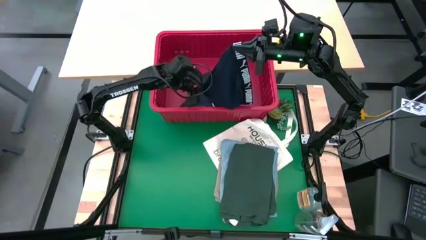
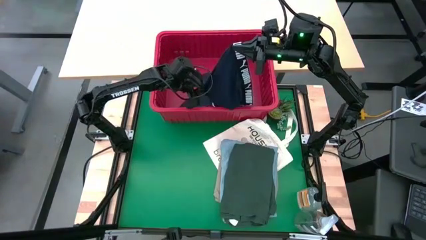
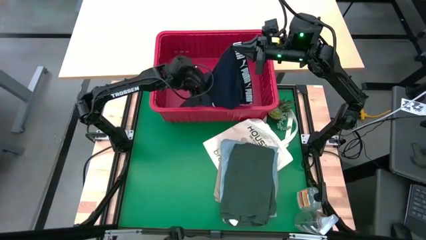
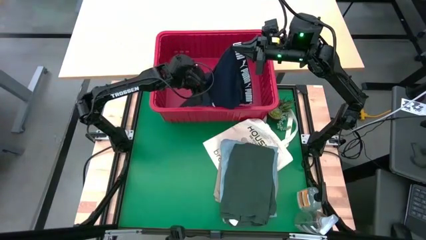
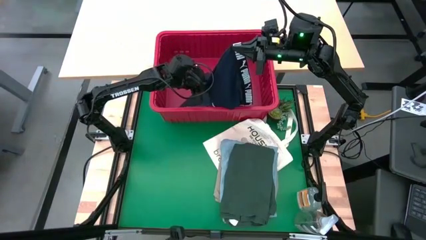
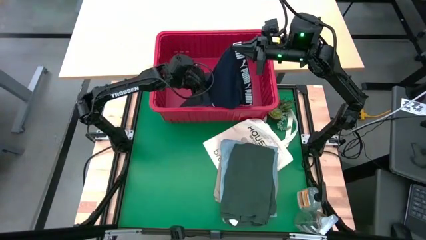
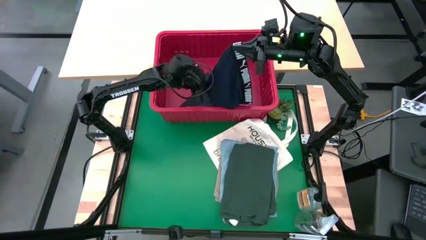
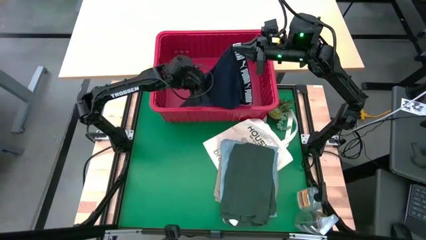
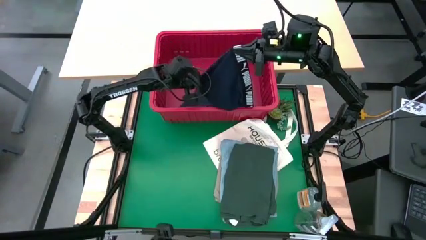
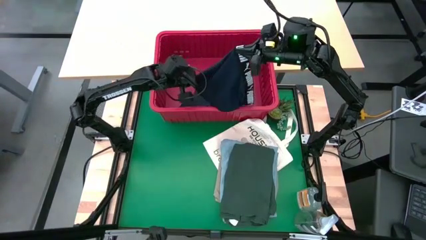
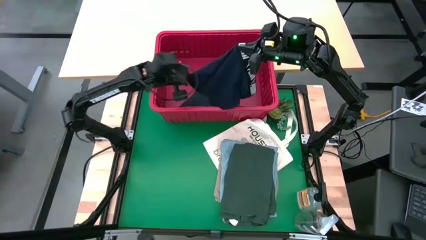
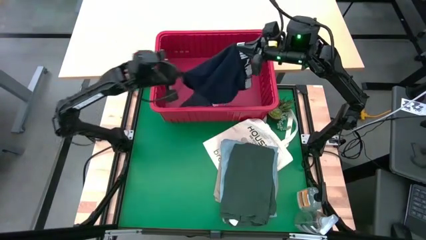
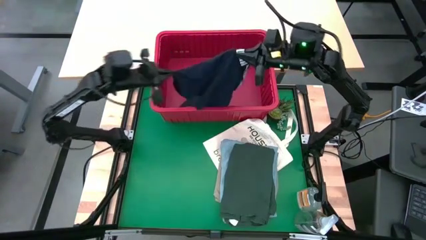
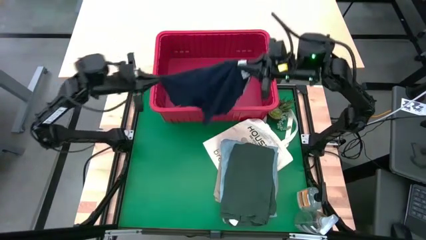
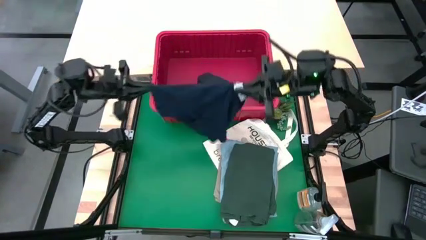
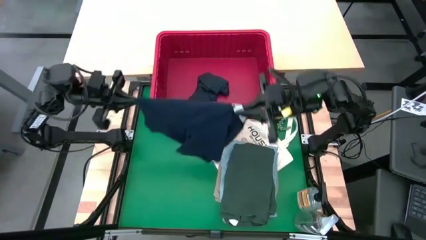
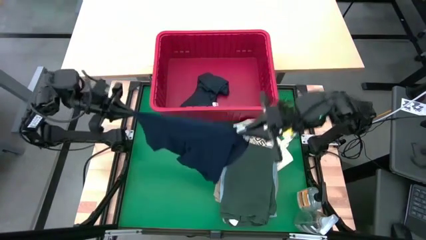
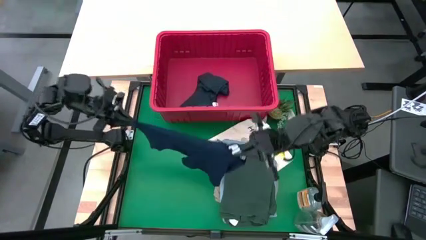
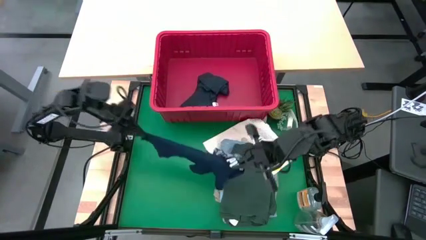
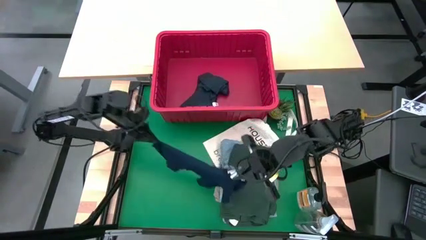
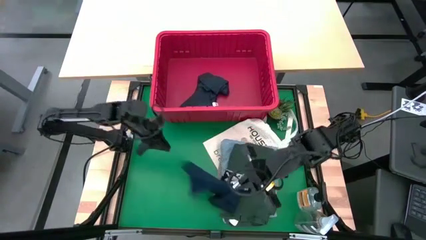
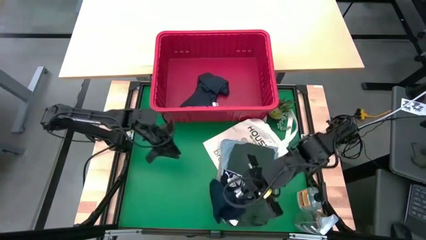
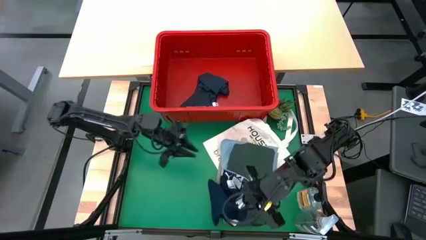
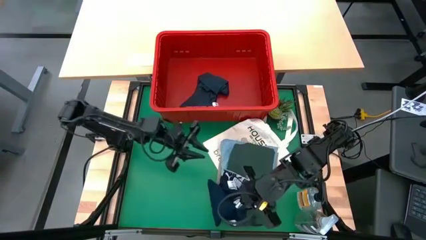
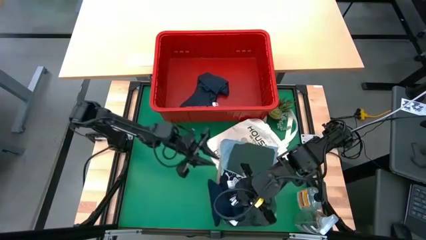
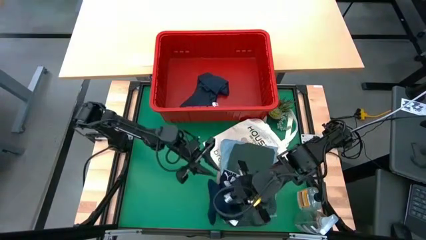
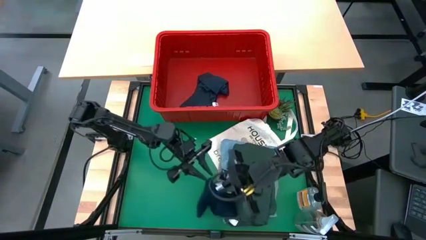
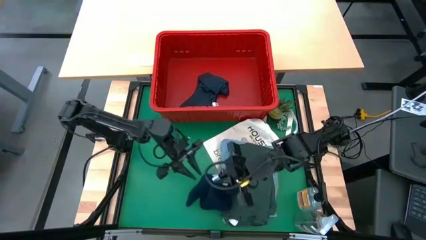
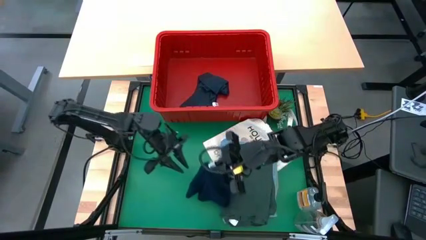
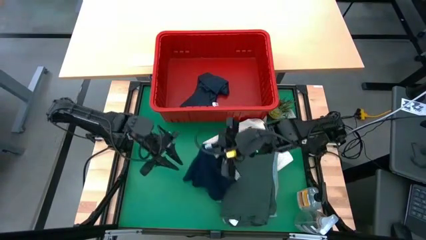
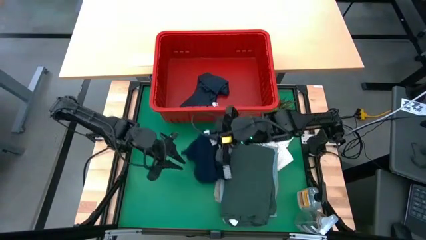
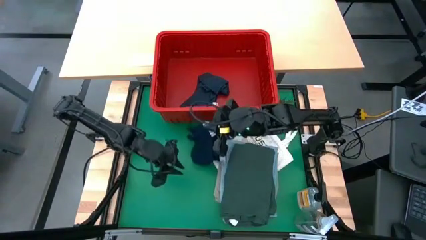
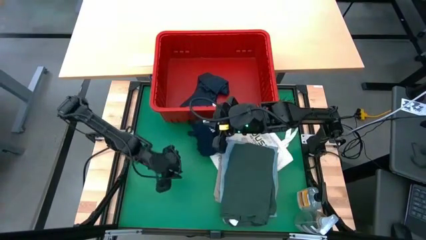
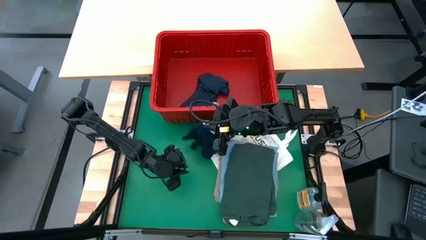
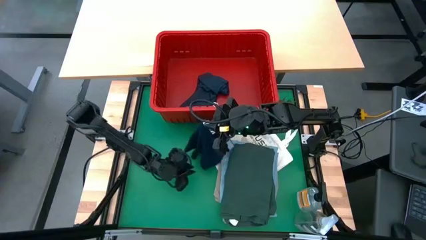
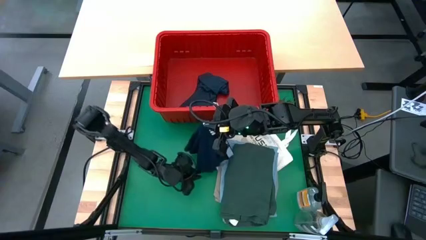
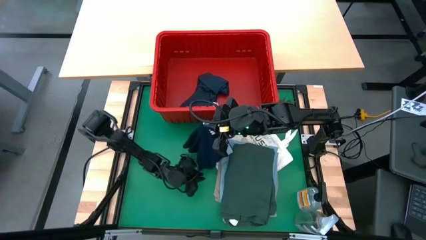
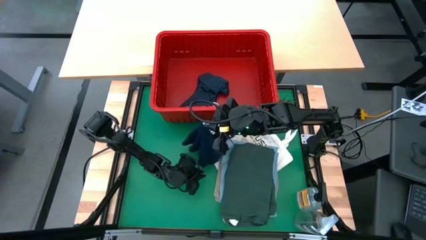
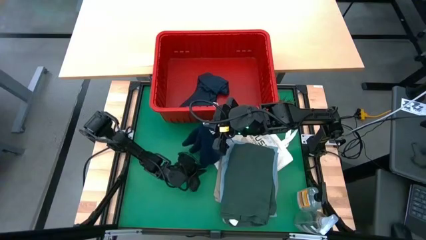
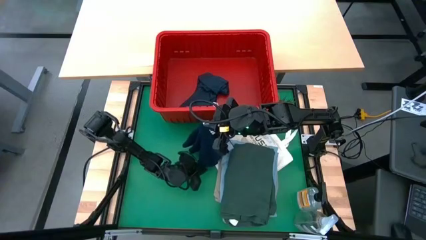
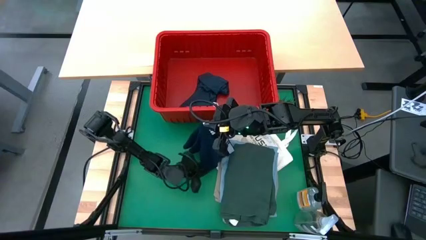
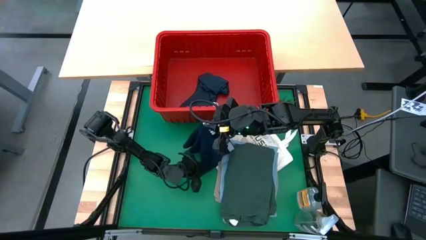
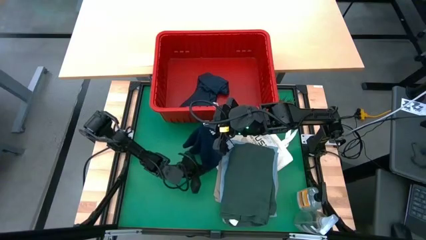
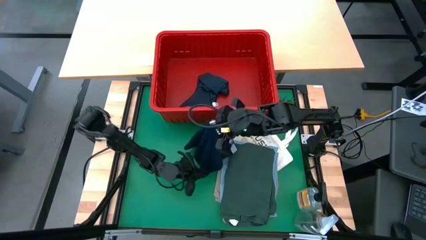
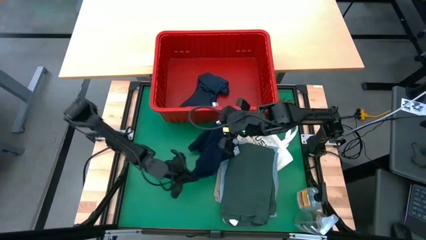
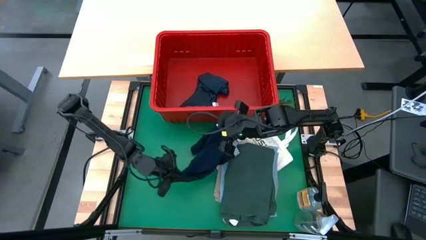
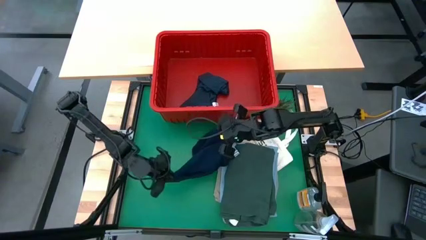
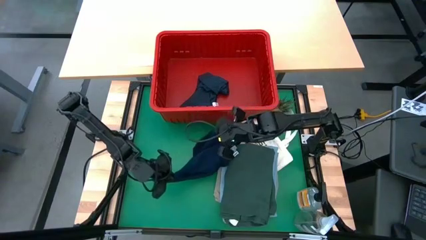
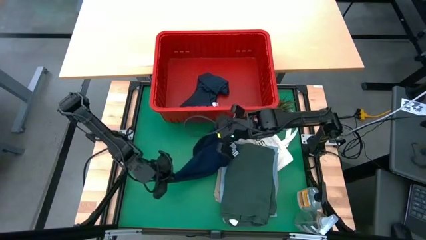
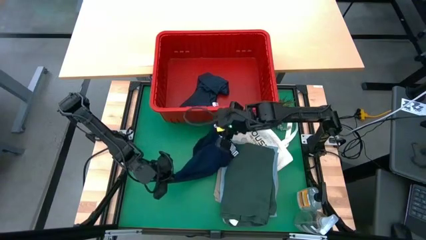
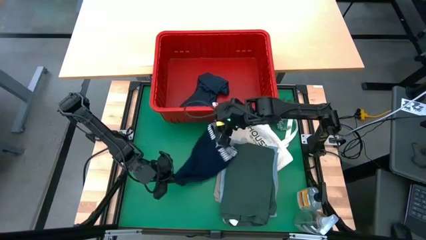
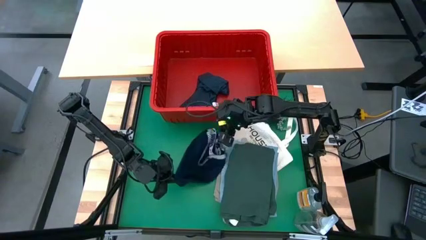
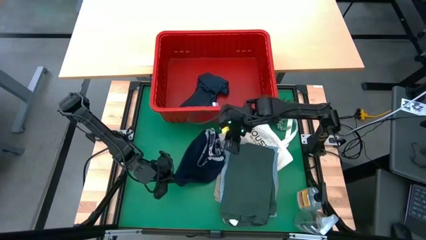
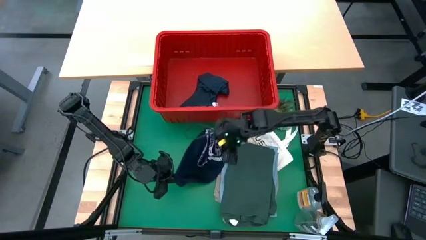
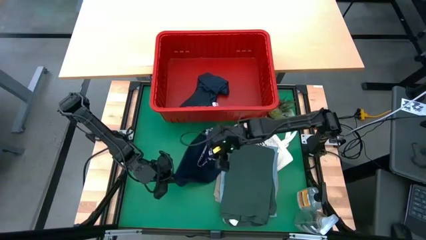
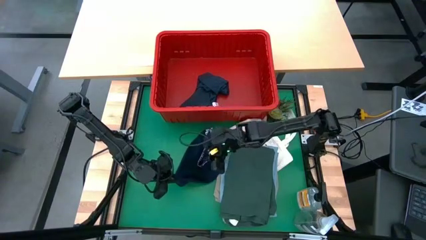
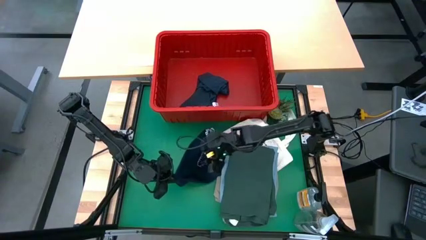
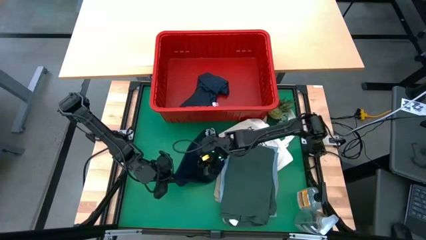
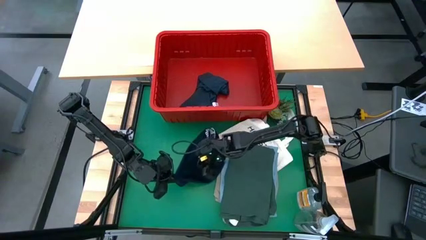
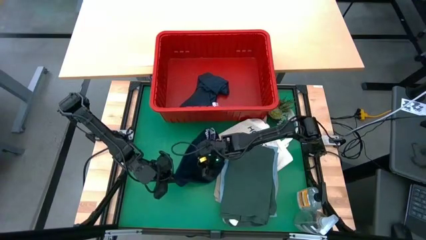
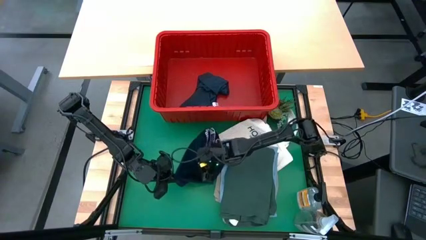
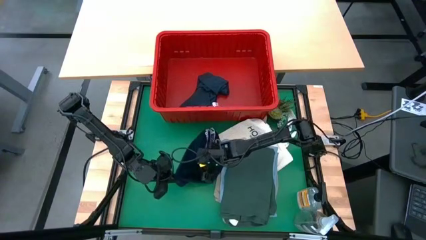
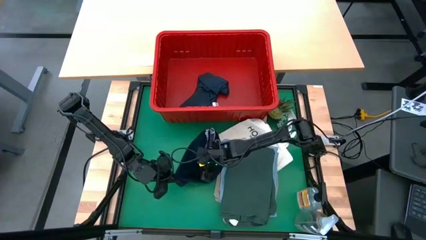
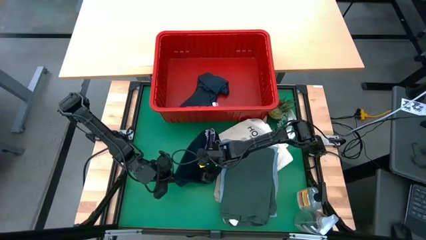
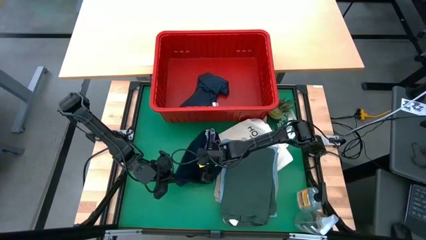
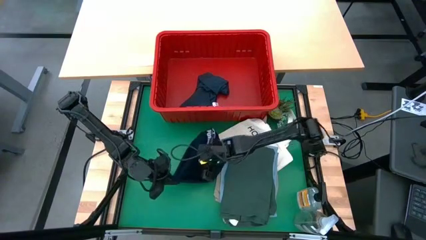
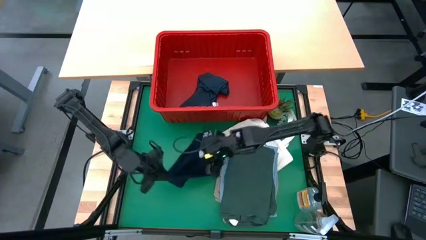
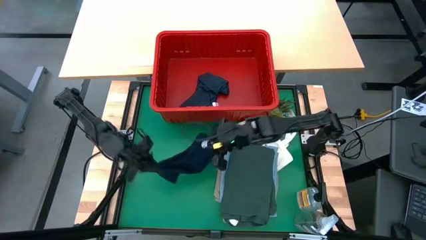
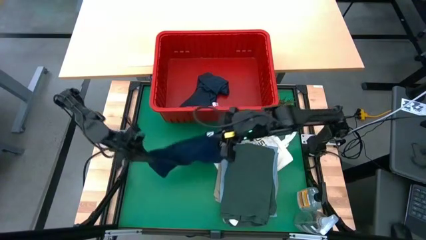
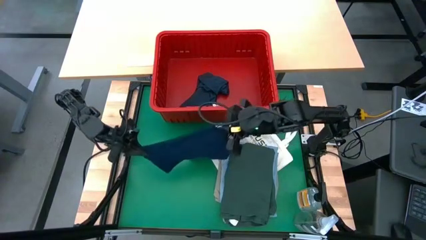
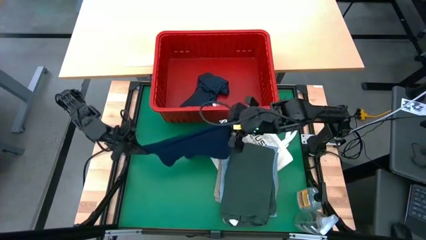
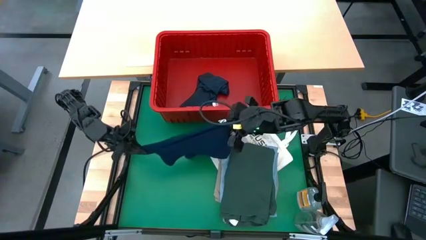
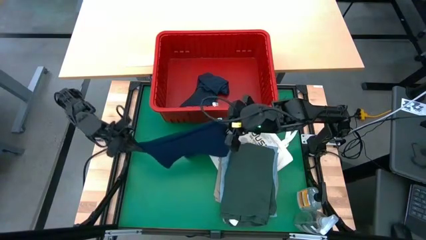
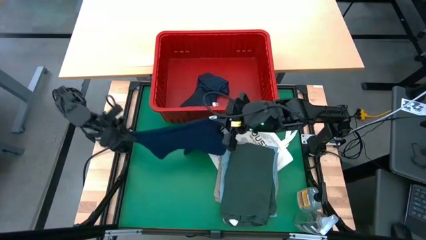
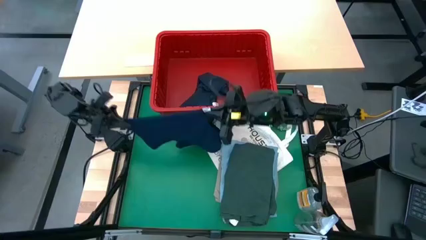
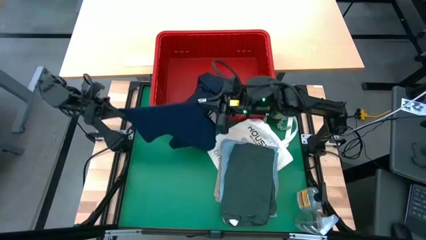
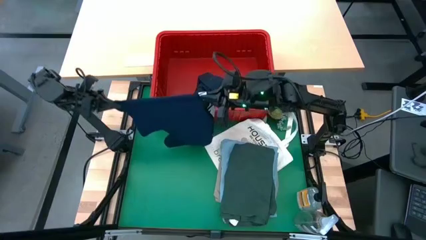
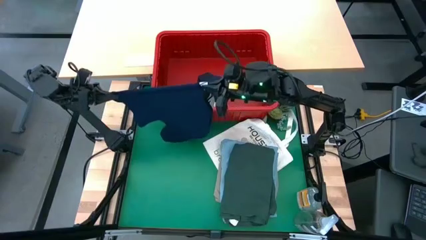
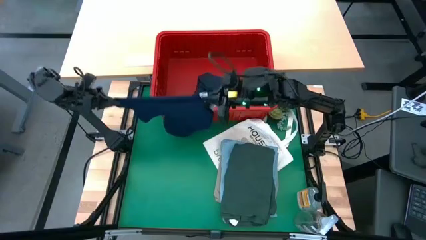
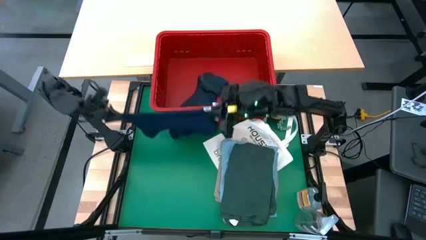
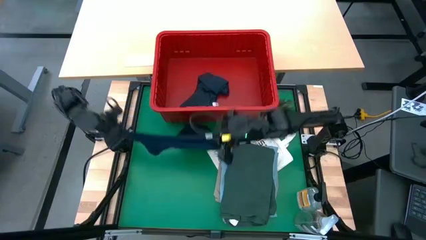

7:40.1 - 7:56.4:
Task: Fold Laundry from Bin
Fold the dark blue boxer
